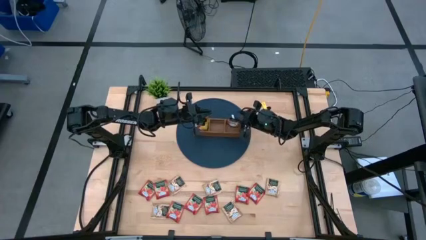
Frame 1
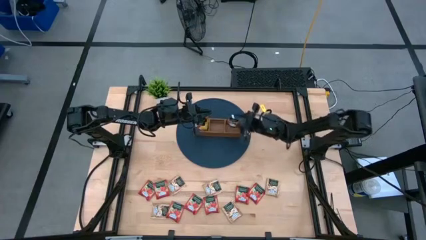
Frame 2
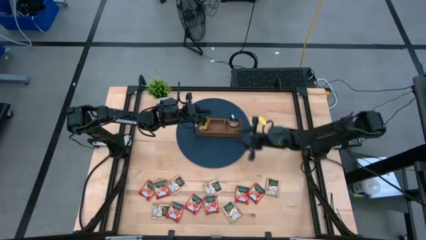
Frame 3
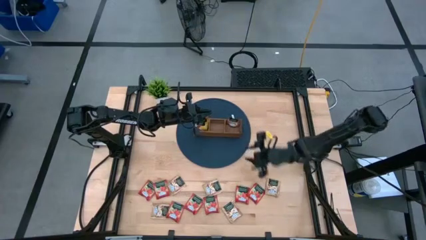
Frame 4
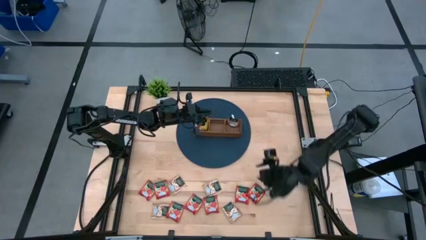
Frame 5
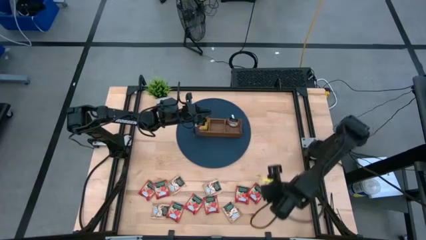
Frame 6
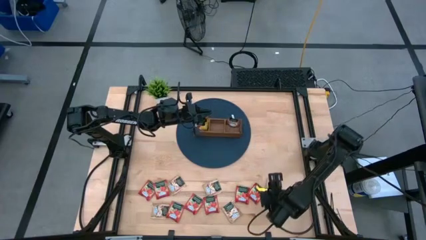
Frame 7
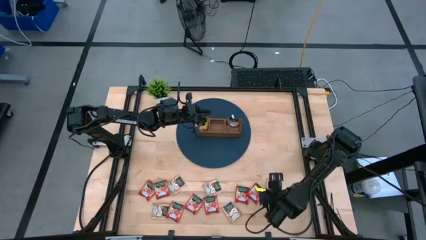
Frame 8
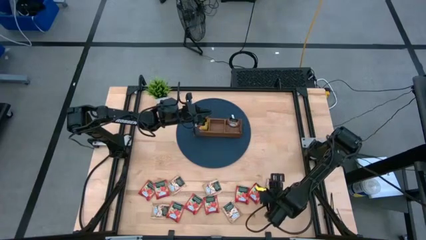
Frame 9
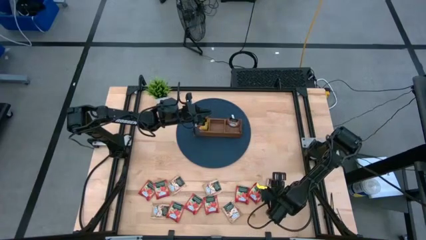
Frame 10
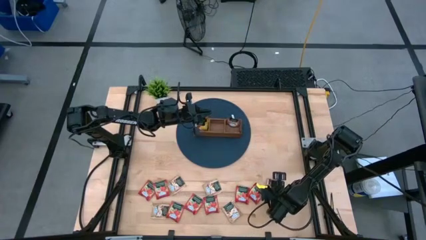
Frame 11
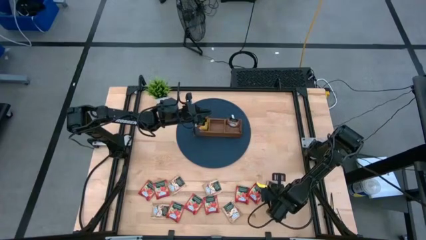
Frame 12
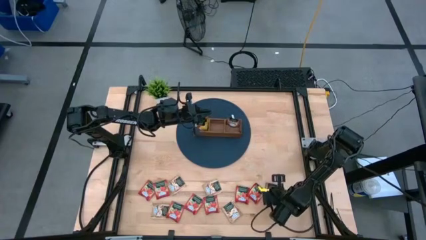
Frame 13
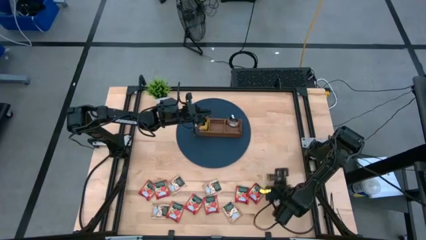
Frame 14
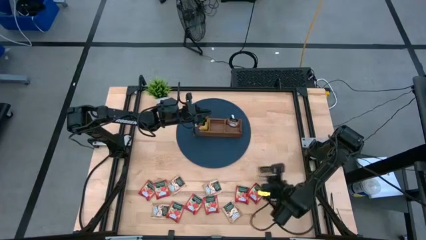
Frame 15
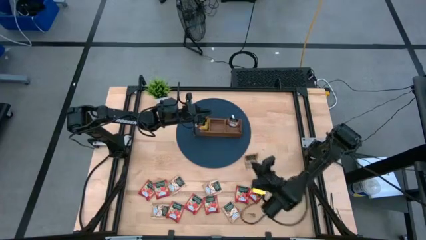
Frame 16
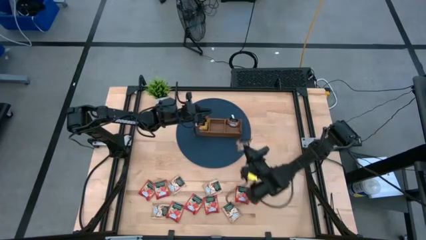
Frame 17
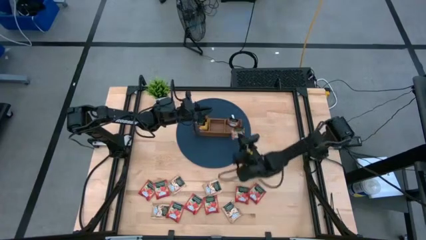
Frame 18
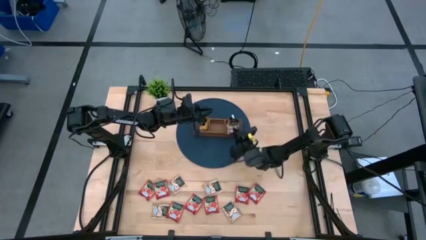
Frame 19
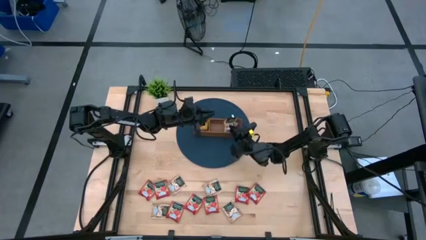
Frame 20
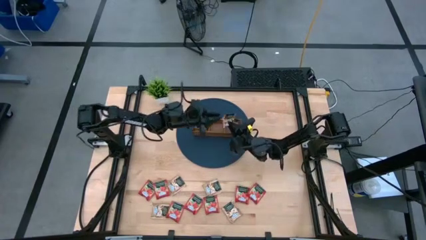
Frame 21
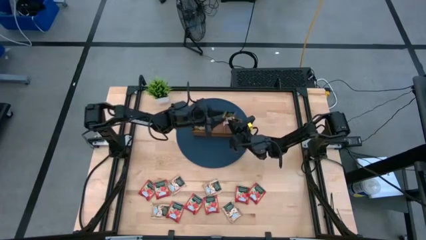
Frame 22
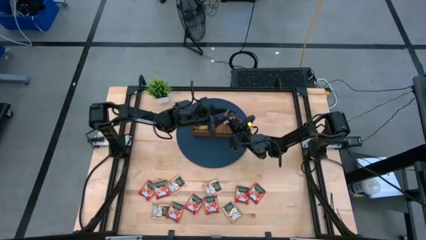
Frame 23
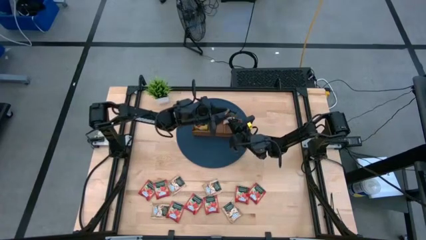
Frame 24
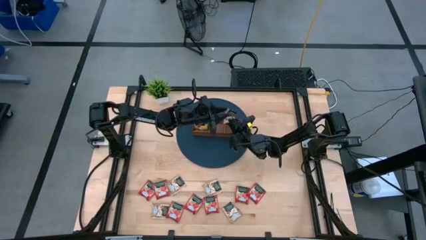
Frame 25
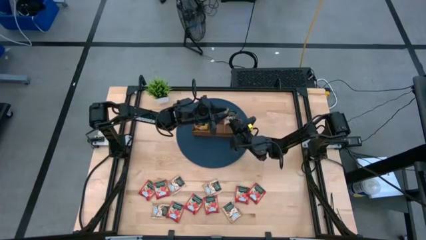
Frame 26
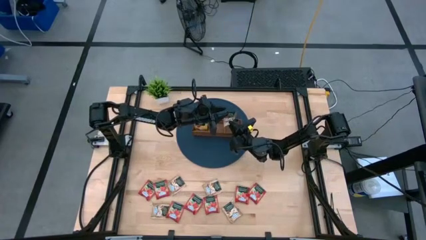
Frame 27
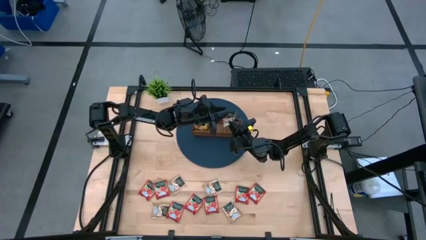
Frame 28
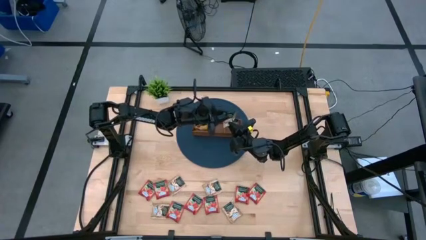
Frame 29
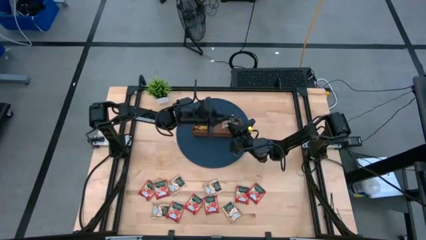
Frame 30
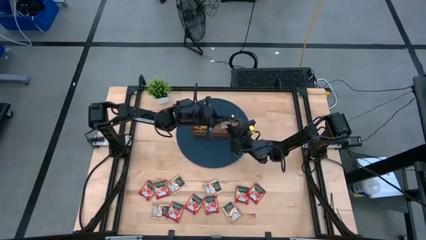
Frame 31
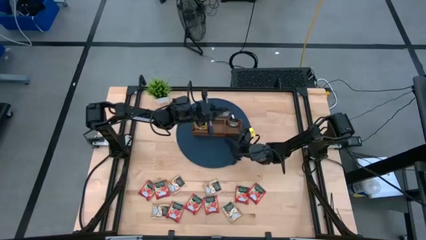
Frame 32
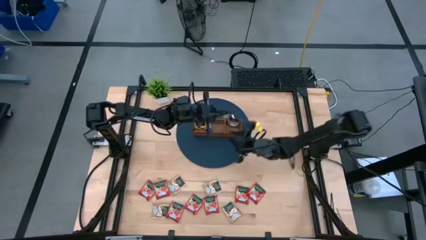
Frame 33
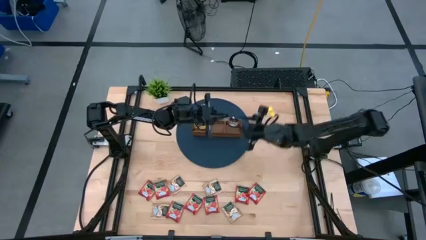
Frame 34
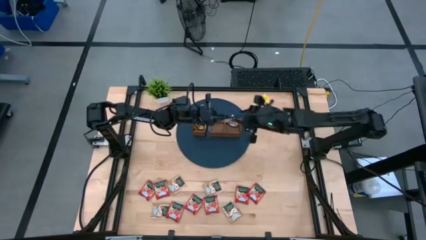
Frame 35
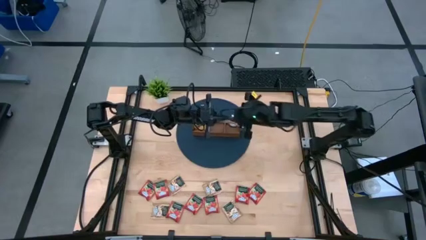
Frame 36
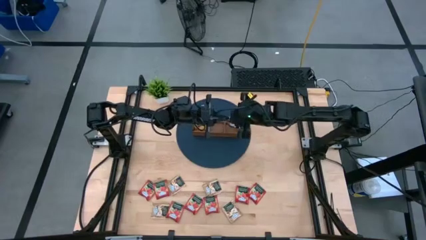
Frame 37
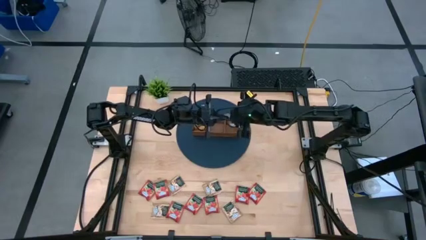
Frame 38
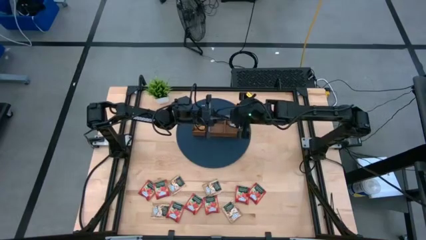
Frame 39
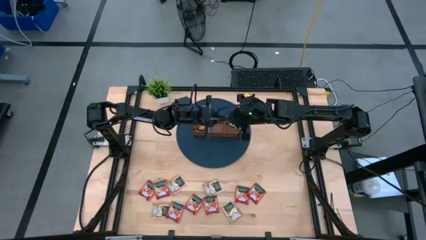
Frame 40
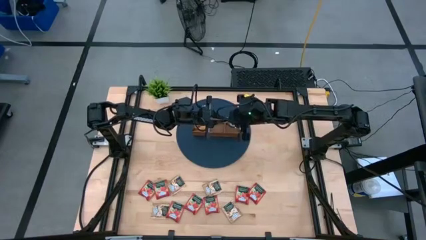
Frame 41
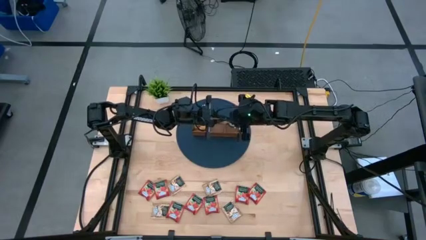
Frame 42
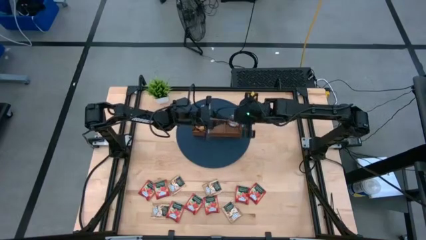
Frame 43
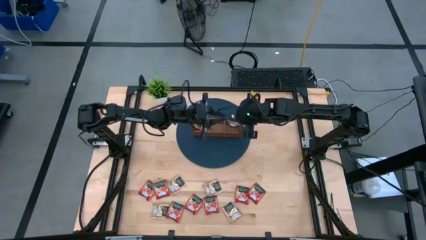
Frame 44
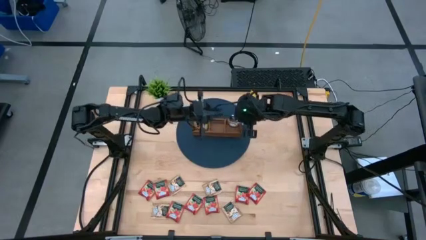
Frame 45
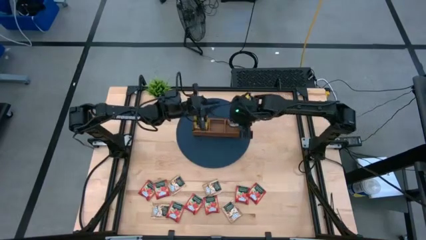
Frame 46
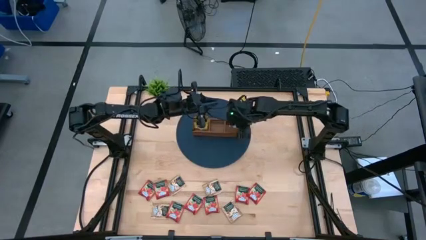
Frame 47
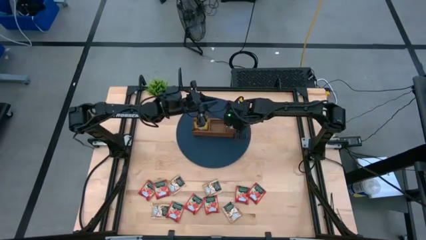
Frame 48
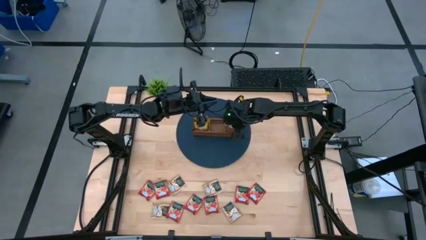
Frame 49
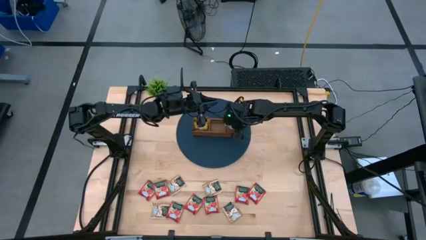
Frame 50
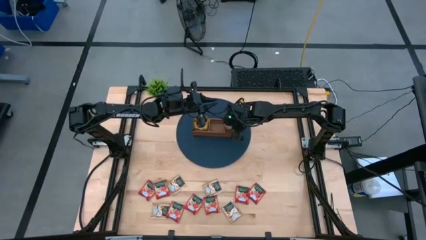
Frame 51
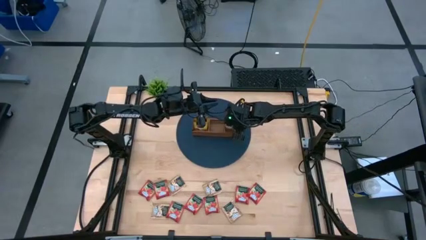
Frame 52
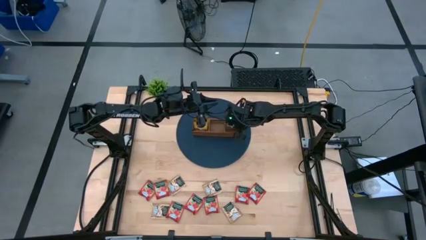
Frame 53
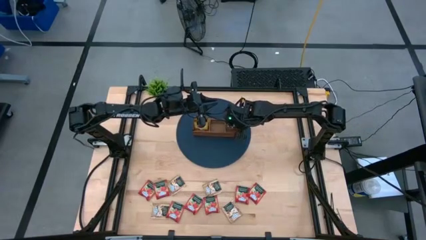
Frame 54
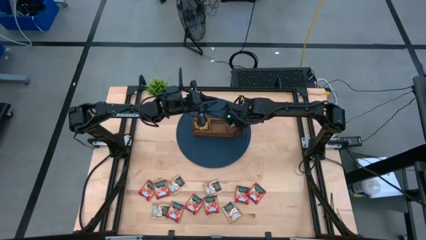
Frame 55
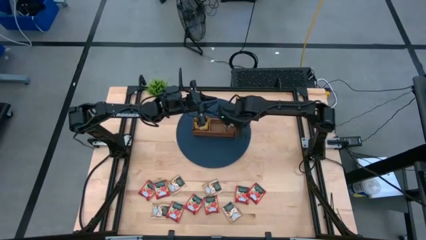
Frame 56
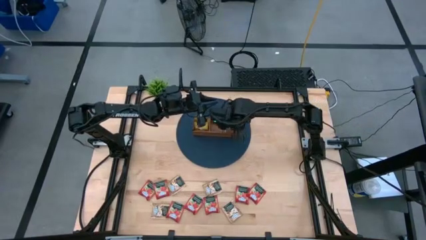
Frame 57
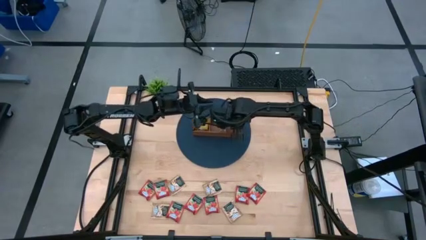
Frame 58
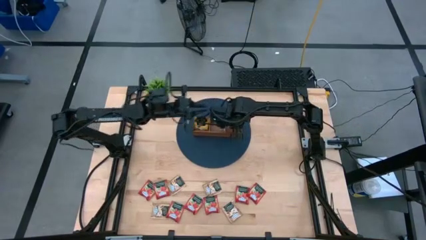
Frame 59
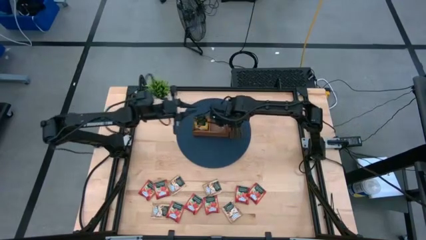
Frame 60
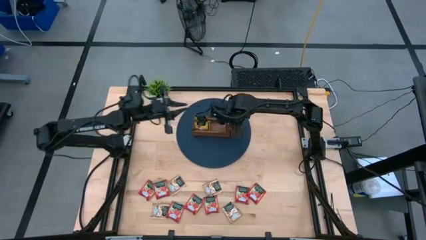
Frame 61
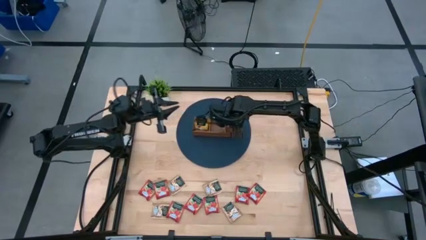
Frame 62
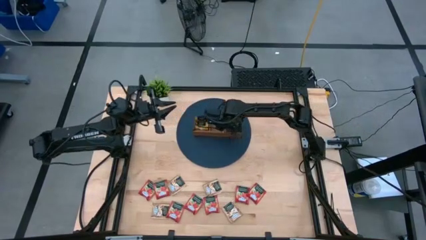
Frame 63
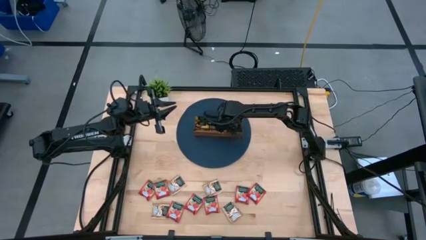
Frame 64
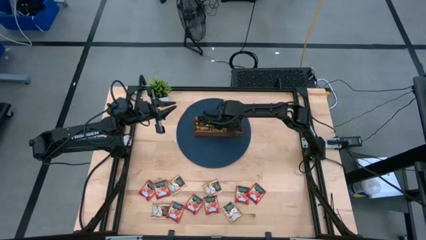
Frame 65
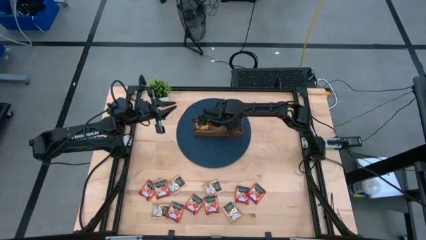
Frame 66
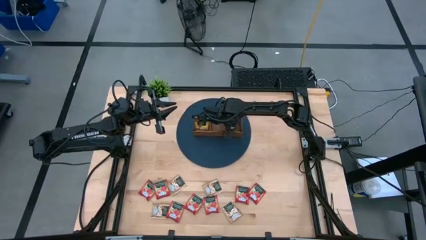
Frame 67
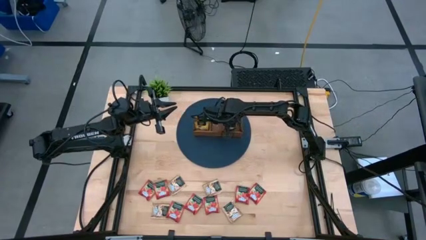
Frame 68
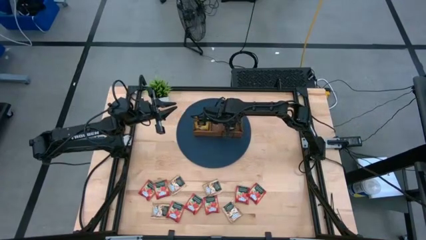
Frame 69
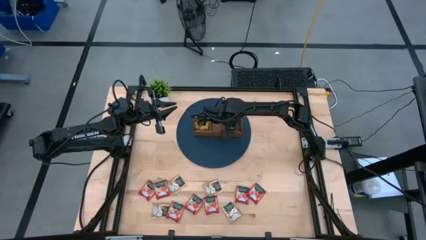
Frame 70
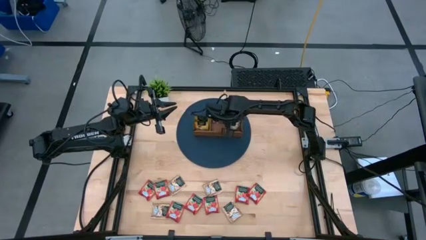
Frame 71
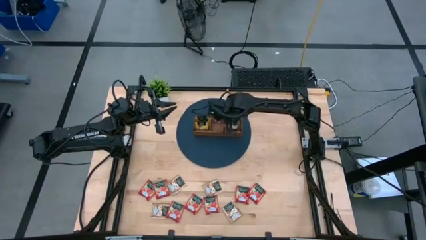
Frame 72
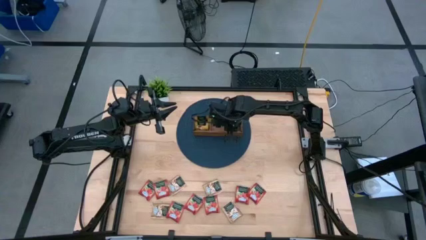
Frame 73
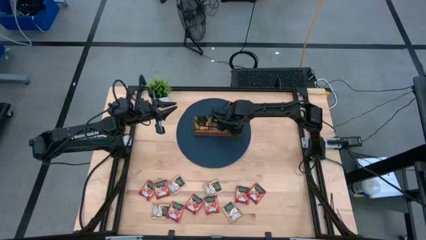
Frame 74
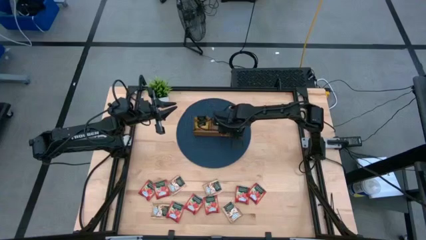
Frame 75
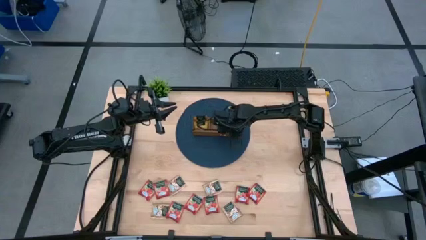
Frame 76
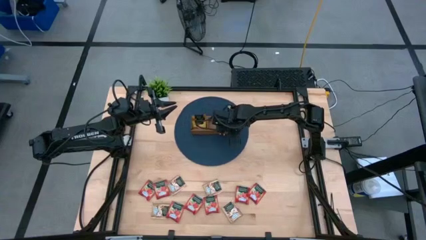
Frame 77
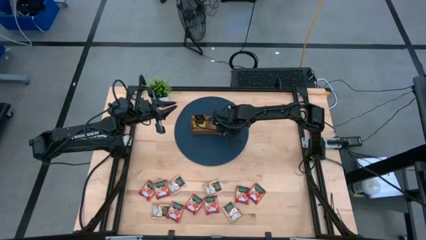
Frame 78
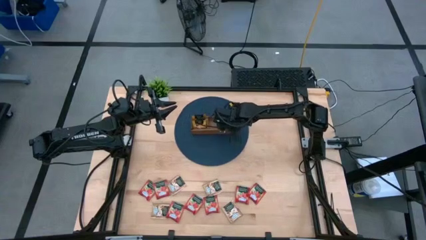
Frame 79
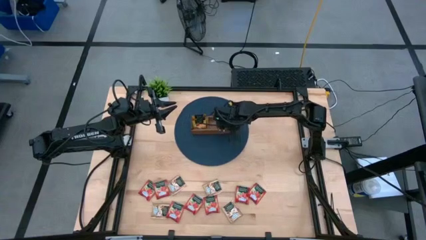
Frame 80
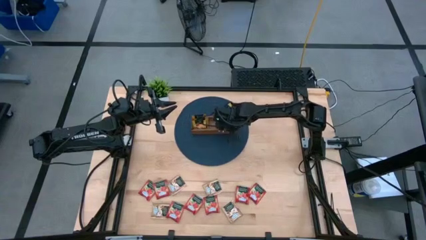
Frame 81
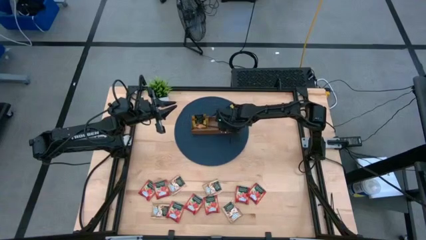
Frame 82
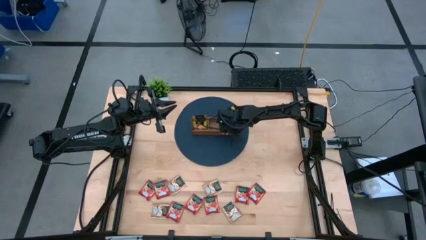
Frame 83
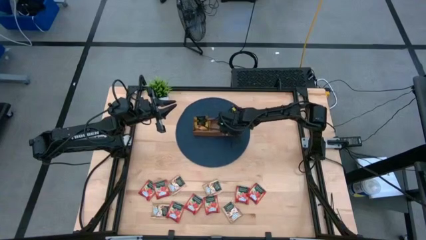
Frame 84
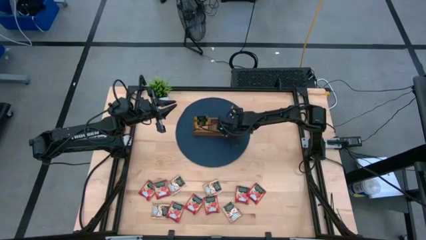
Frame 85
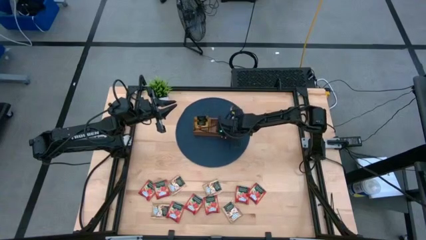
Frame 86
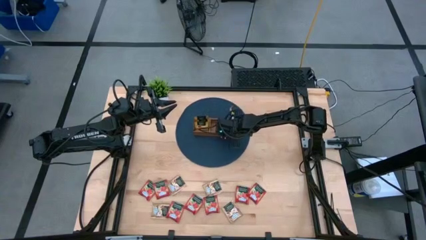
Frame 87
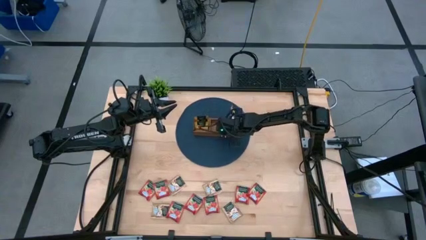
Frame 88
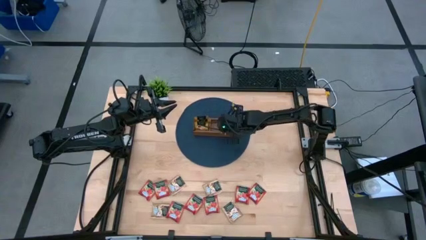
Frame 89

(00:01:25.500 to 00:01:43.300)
Task: Pick & Place Tea
Put the brown tea bag into the right section of the wooden organizer
